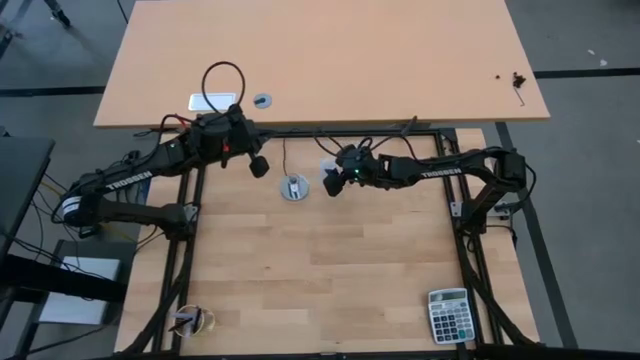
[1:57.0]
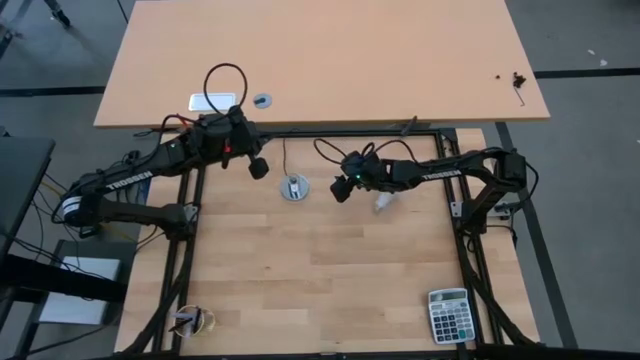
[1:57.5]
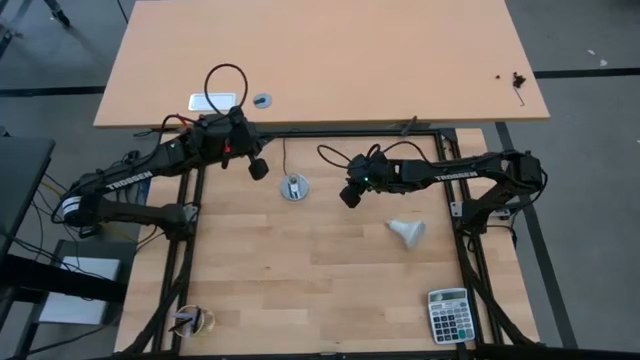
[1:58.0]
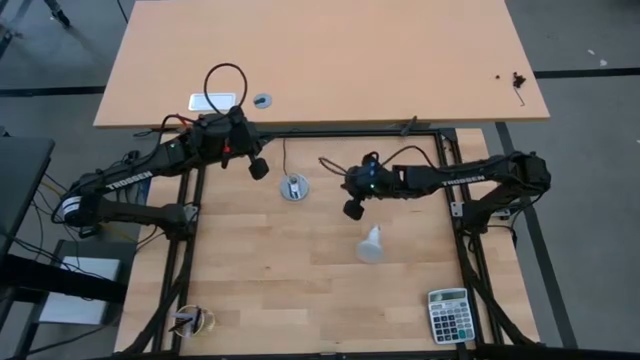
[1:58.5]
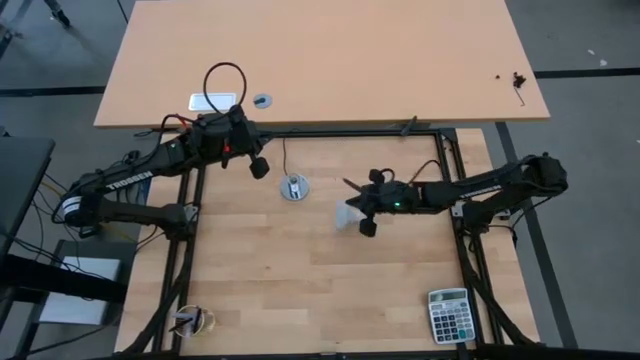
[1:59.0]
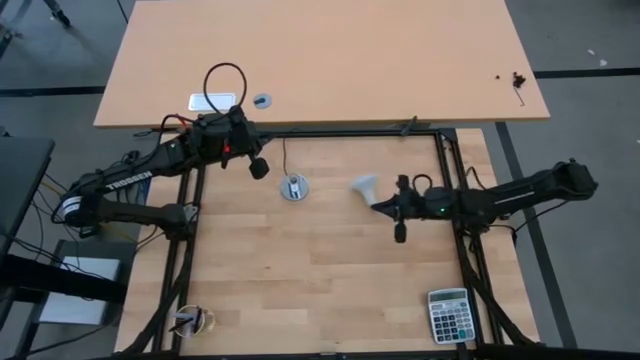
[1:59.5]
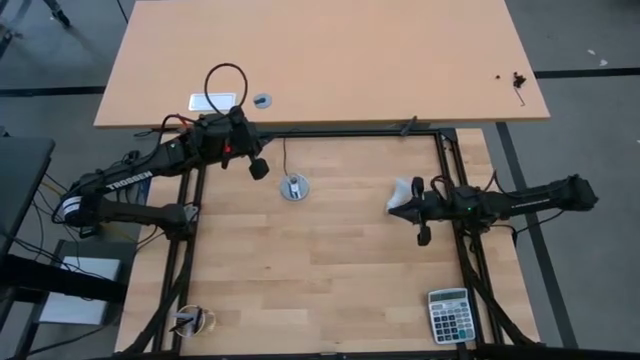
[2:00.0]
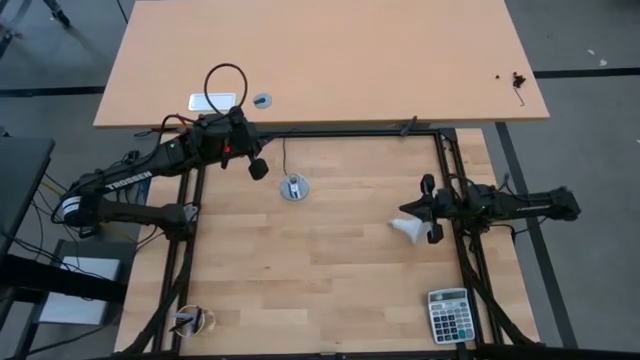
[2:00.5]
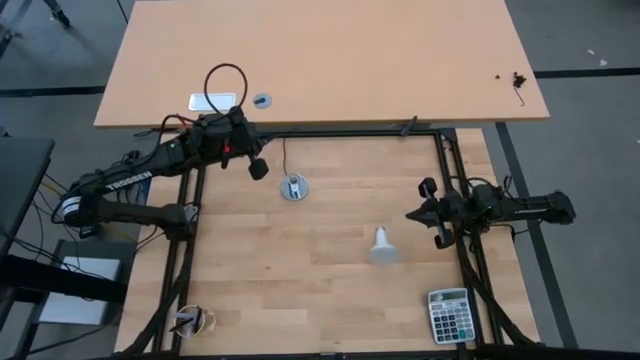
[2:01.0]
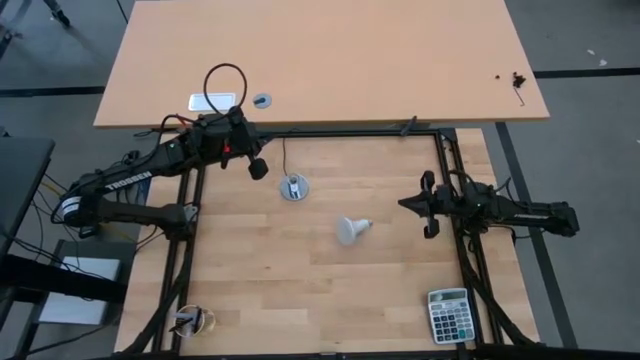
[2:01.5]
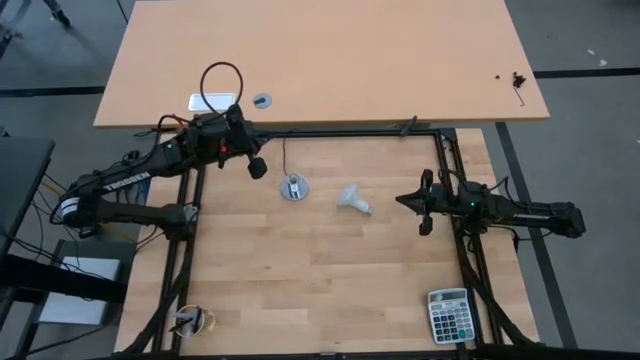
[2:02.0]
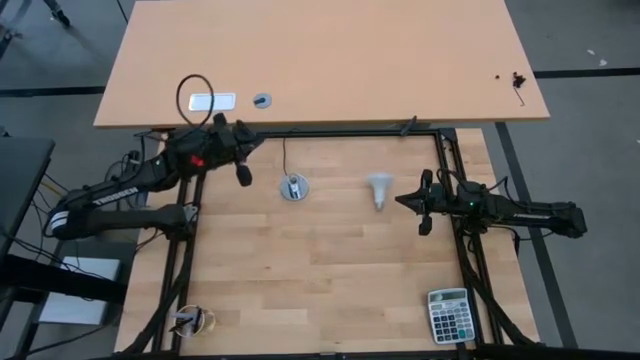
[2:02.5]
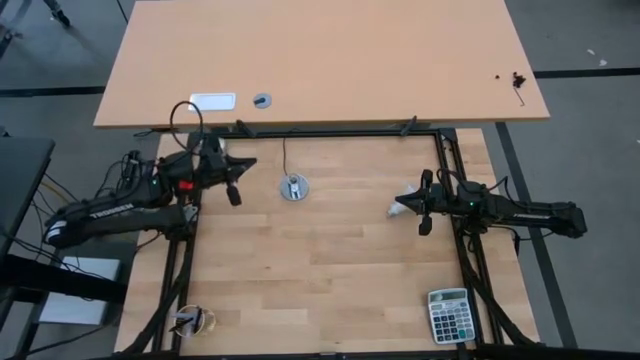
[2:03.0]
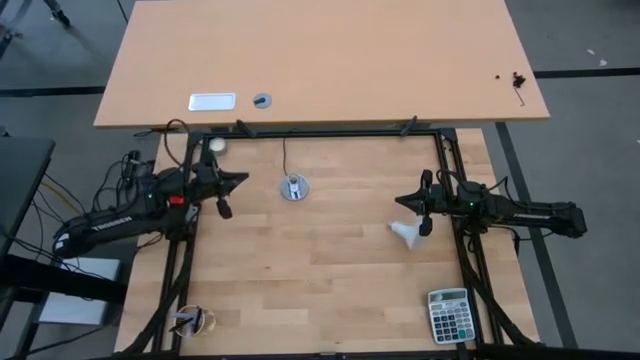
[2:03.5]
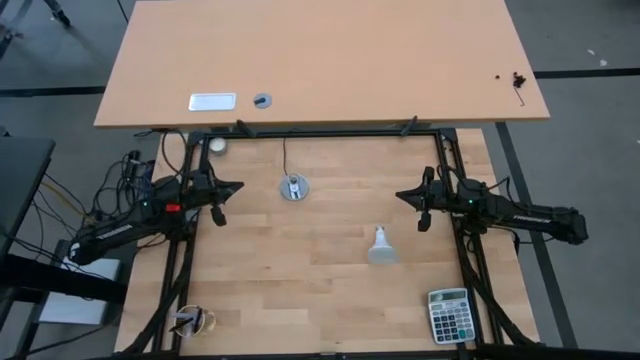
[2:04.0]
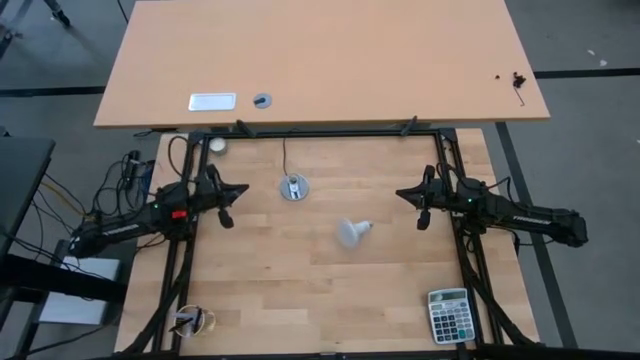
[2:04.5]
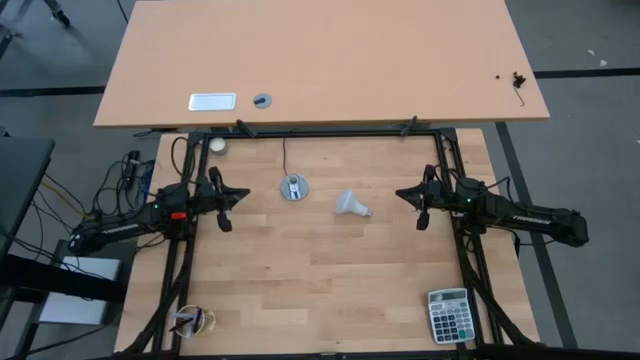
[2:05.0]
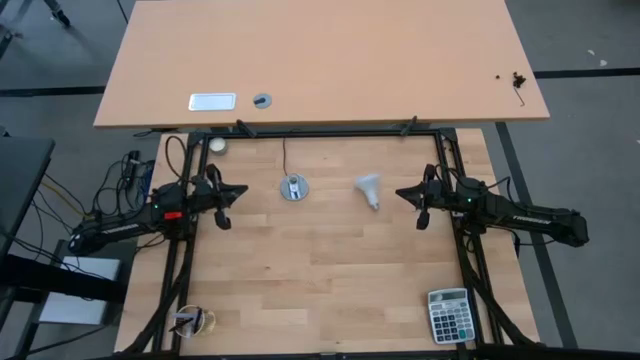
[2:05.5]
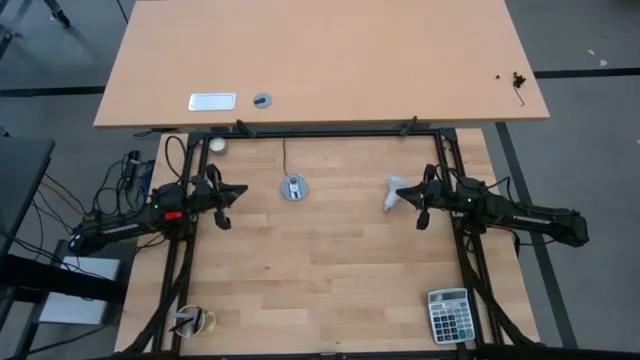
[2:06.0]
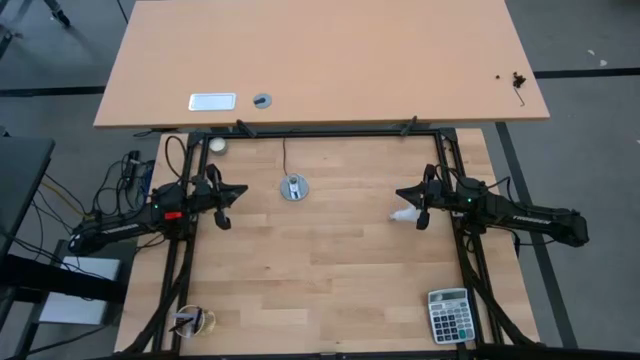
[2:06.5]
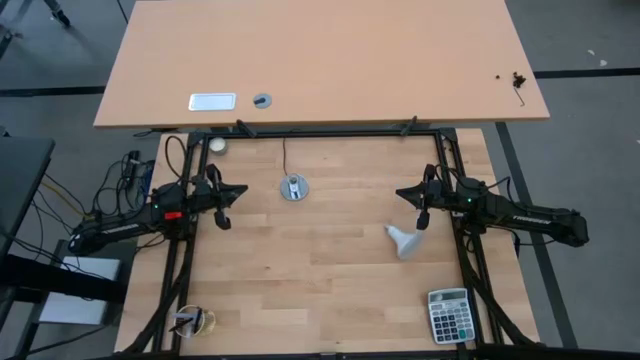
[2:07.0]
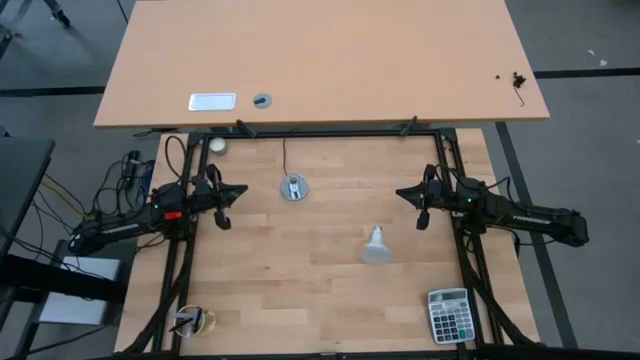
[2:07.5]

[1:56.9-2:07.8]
Task: Screw lightbulb
Return to Home Position

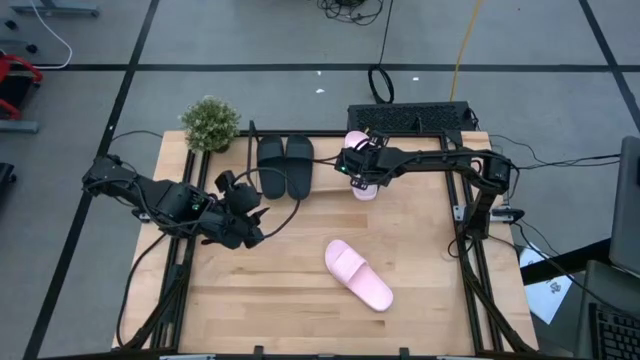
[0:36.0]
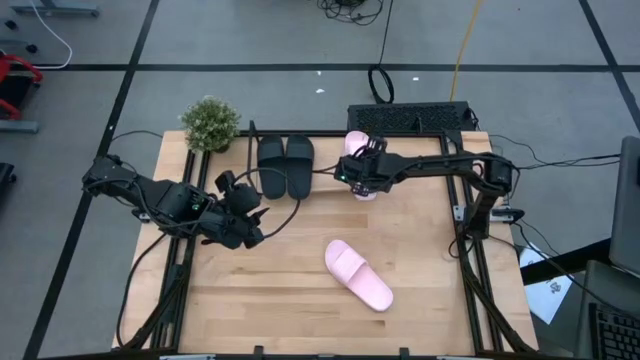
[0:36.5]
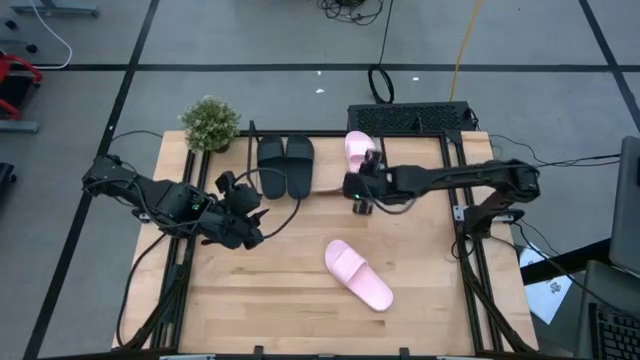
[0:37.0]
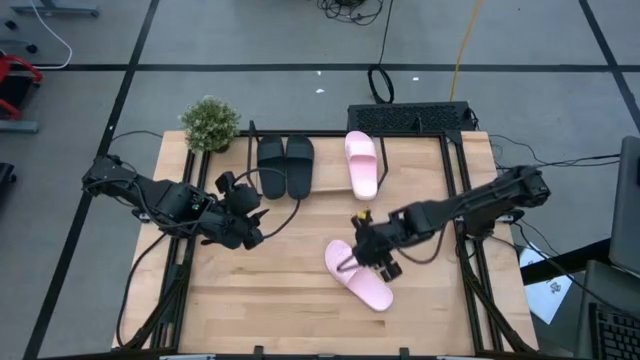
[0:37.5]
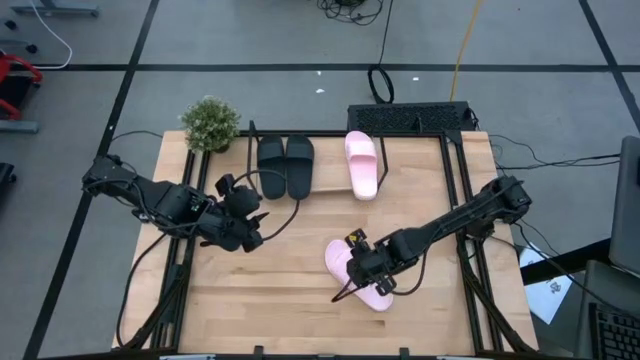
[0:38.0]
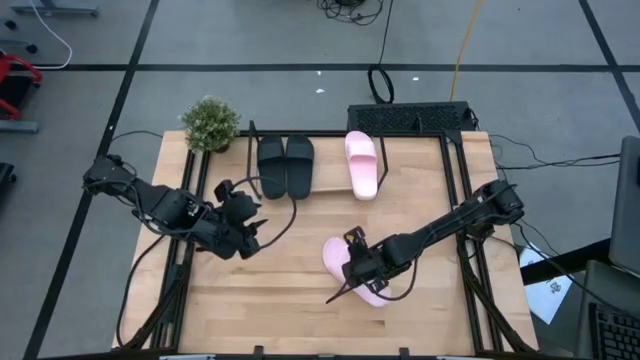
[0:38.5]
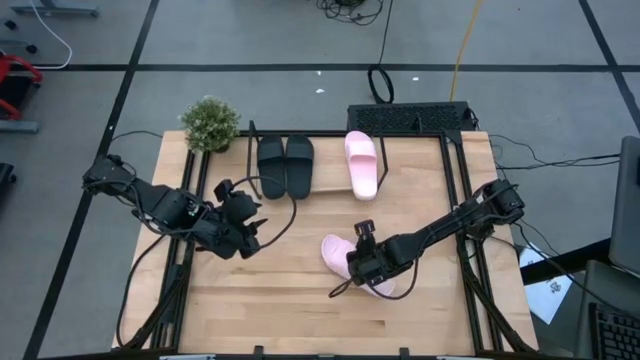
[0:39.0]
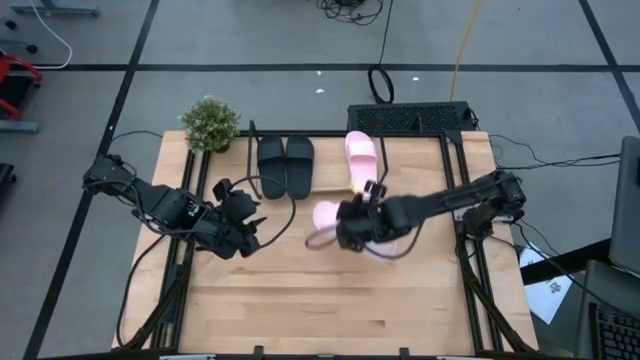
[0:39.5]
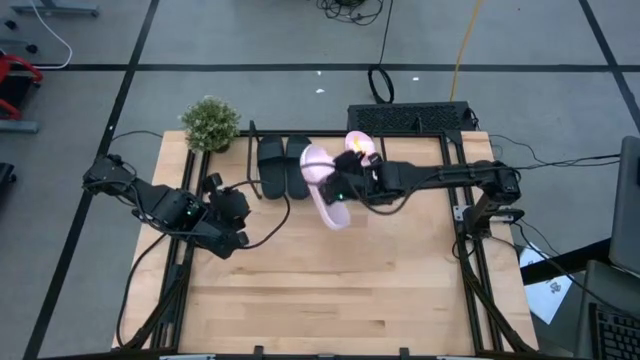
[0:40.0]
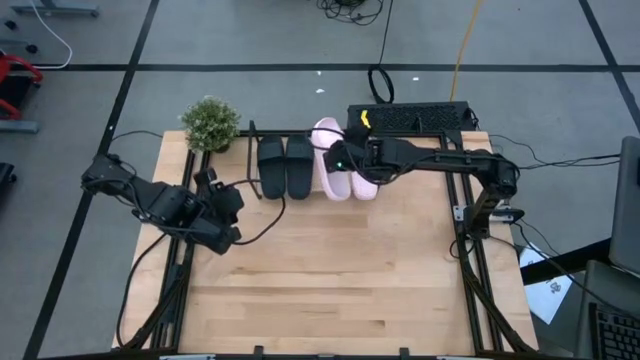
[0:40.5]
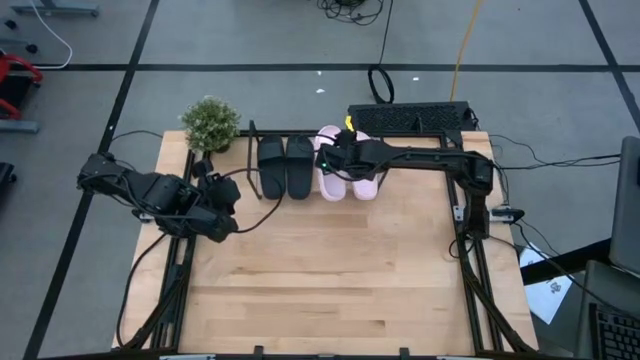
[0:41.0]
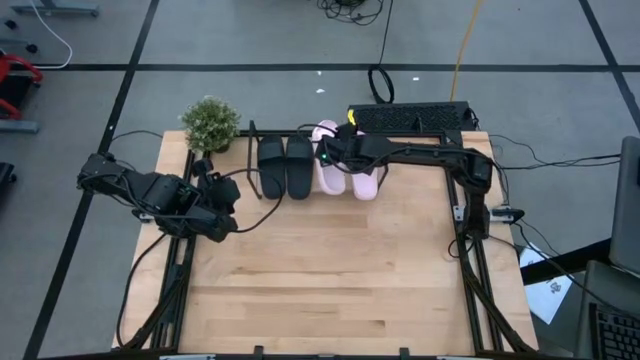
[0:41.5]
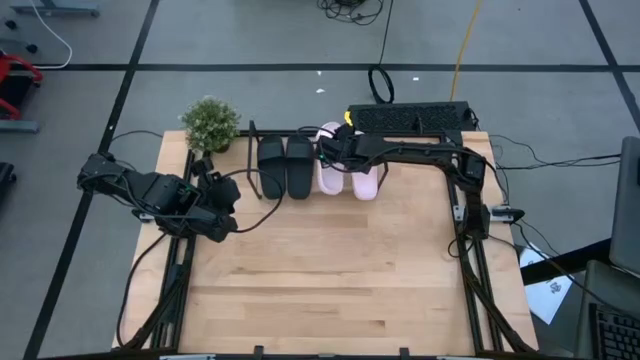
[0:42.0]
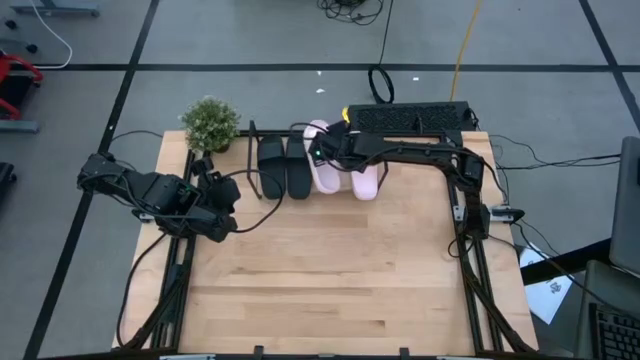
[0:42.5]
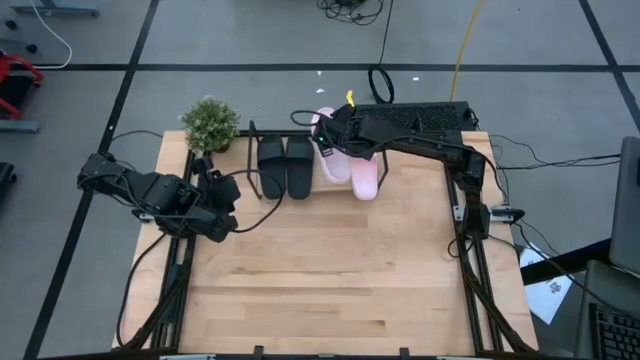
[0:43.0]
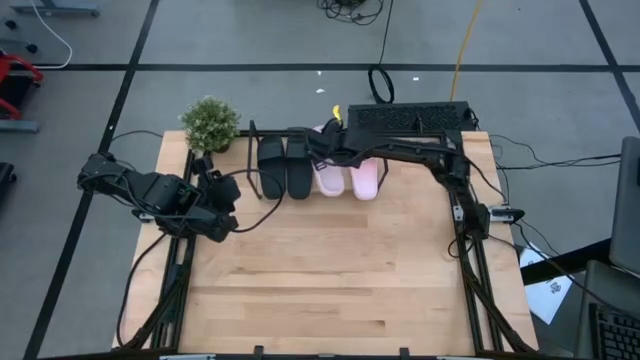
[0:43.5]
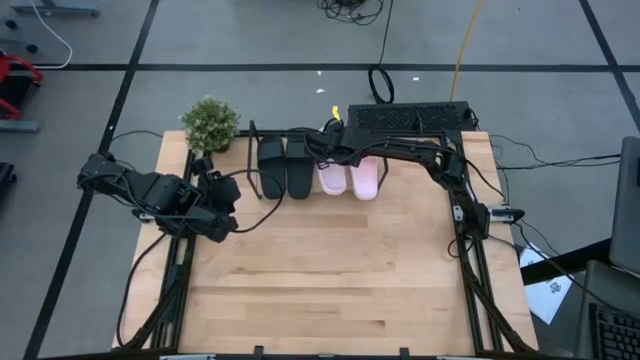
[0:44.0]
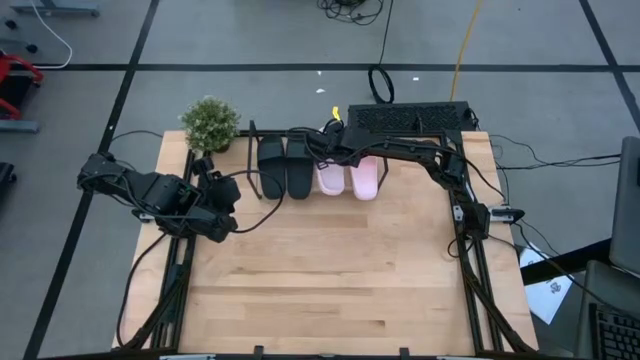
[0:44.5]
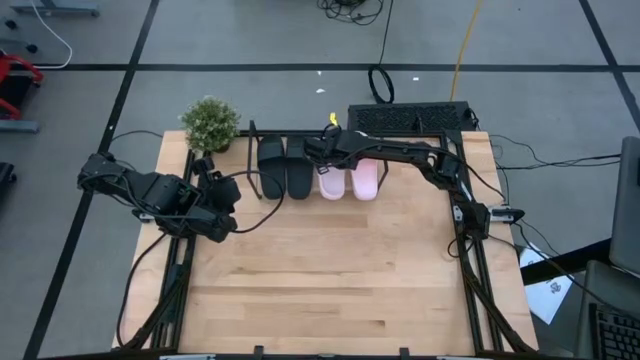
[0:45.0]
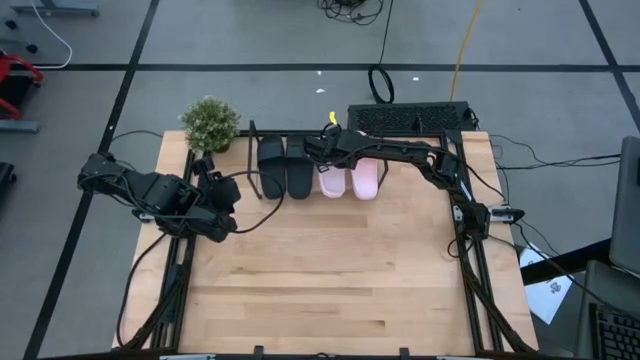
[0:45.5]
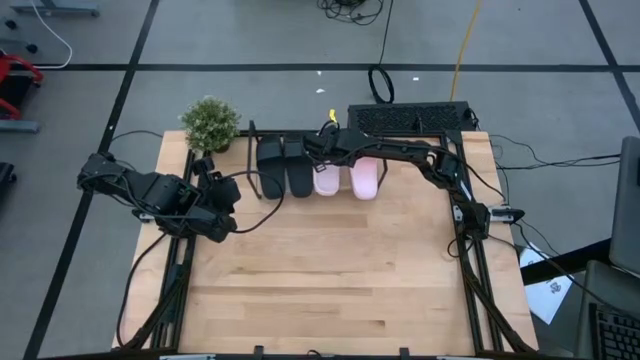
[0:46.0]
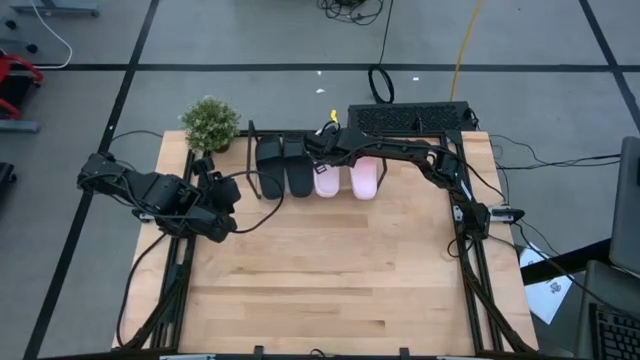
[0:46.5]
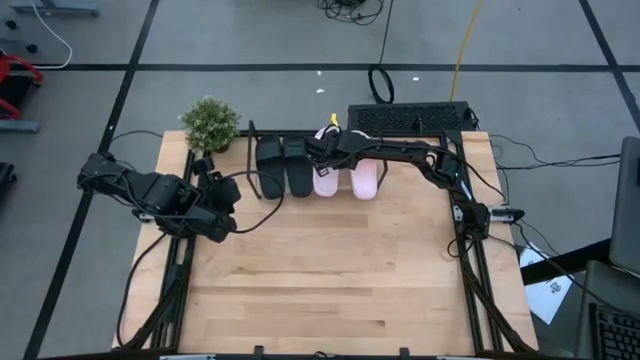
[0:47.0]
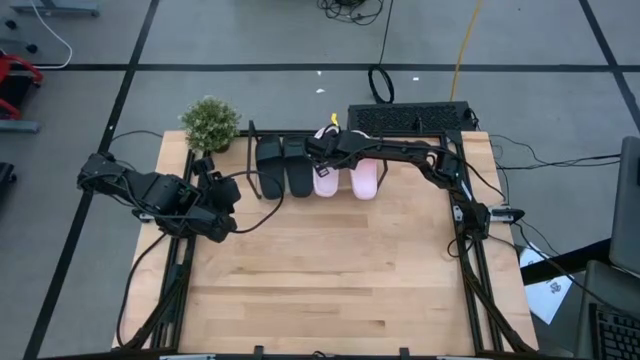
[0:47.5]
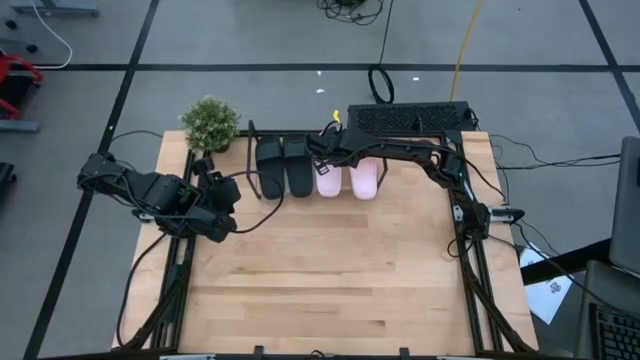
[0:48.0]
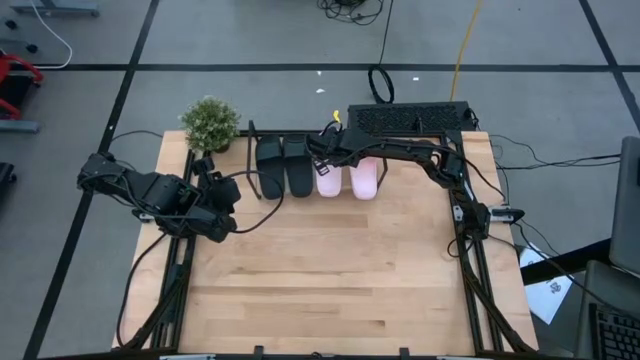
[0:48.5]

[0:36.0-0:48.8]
Task: Pick and place slides into the shelf
Put the pink slipper on the shelf
